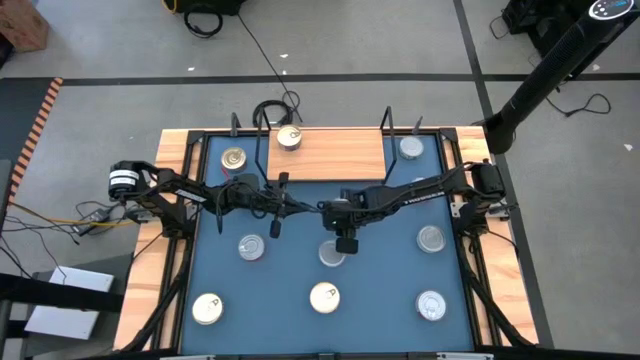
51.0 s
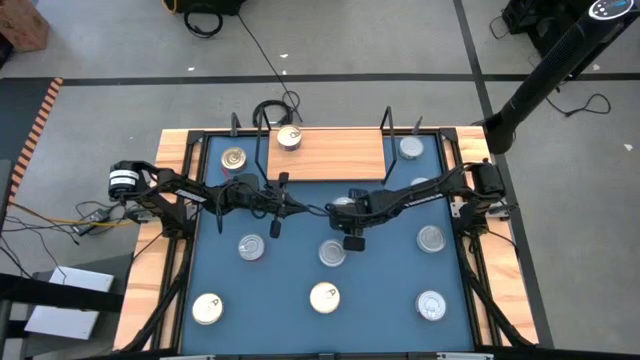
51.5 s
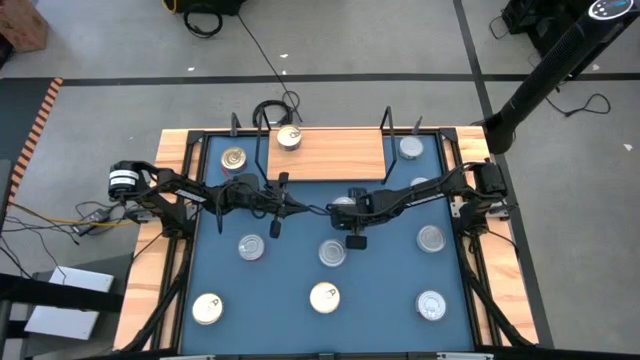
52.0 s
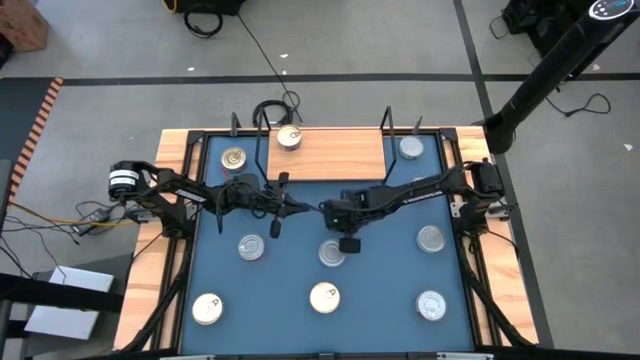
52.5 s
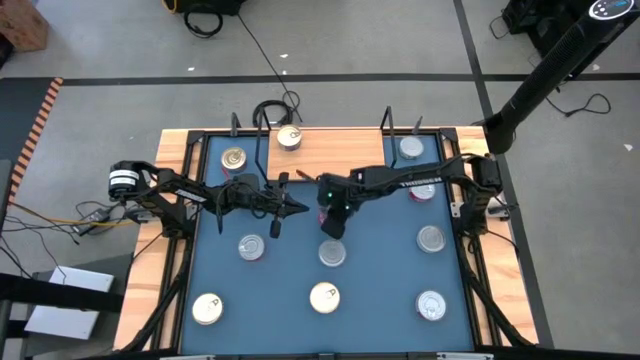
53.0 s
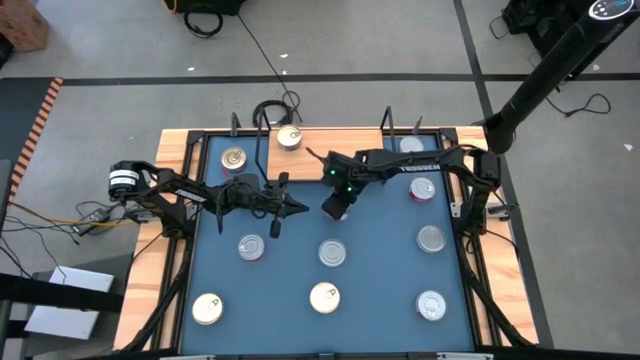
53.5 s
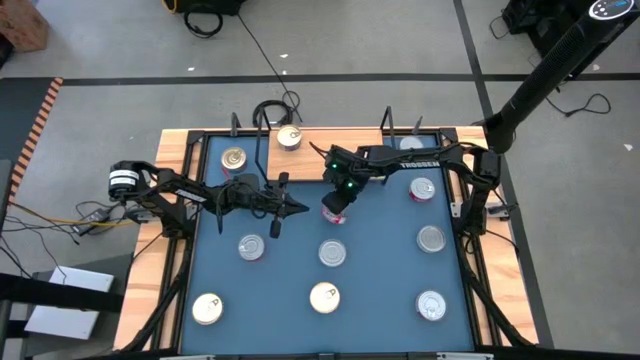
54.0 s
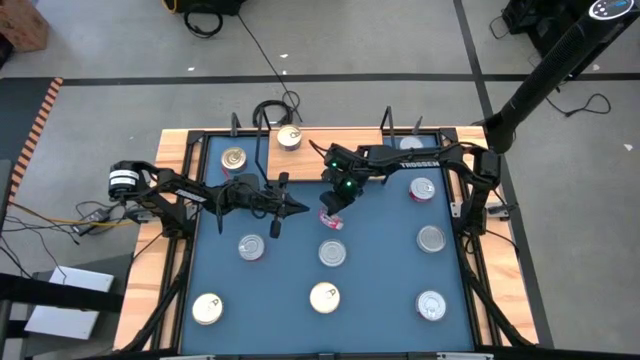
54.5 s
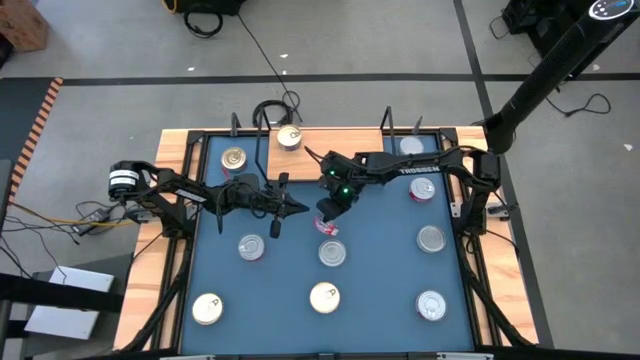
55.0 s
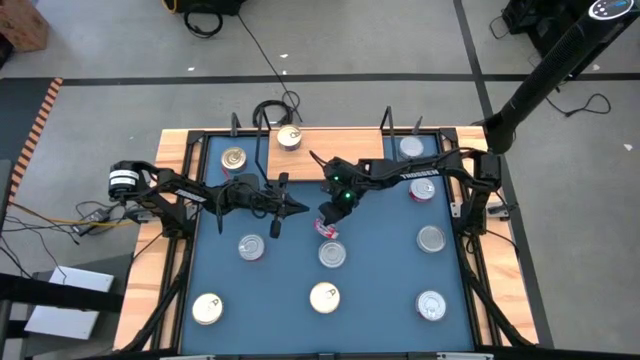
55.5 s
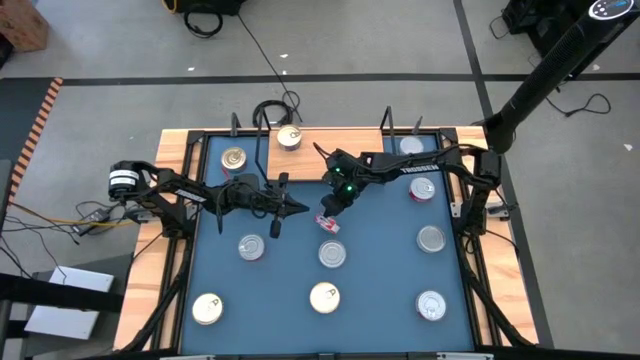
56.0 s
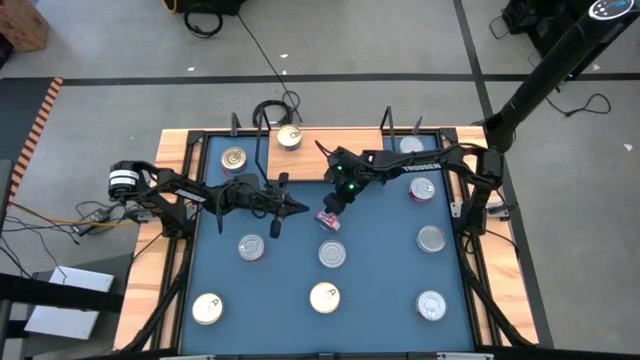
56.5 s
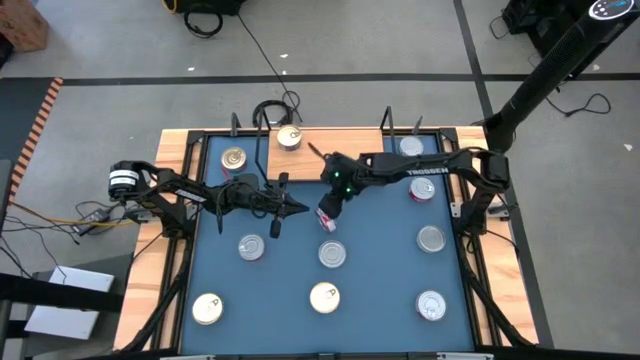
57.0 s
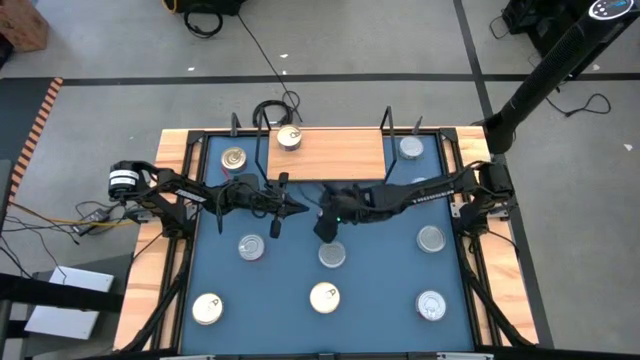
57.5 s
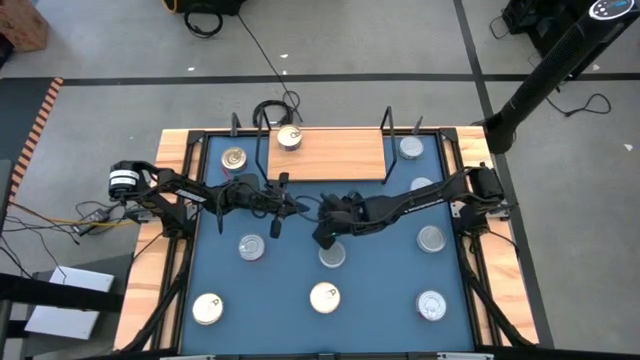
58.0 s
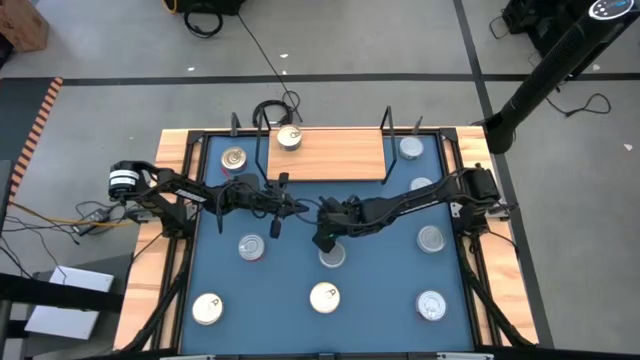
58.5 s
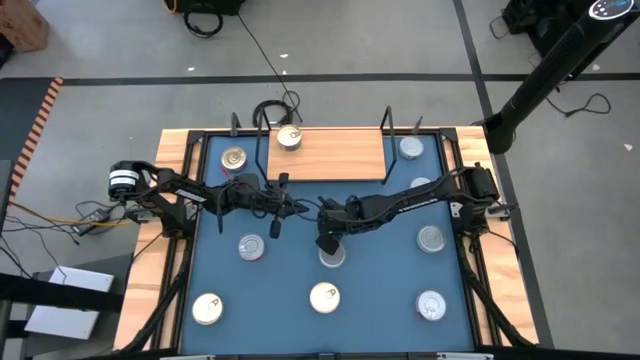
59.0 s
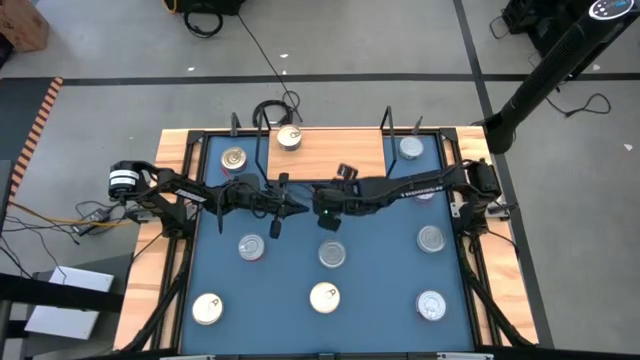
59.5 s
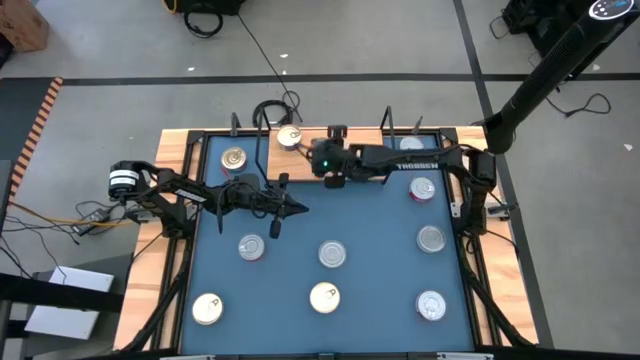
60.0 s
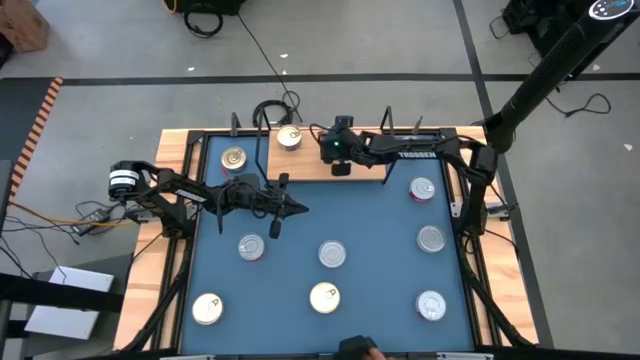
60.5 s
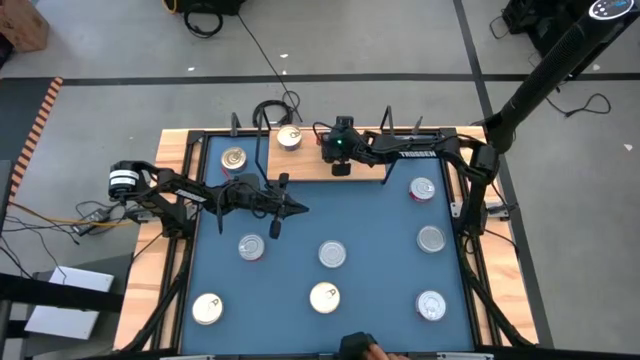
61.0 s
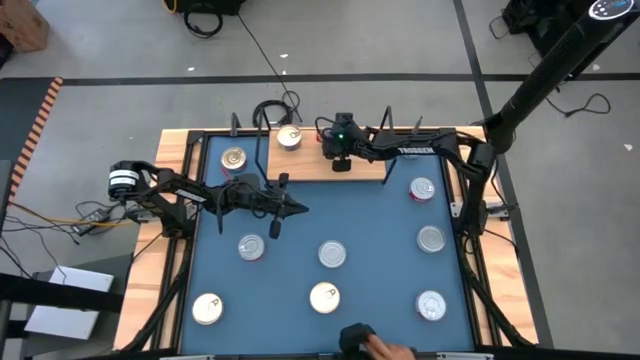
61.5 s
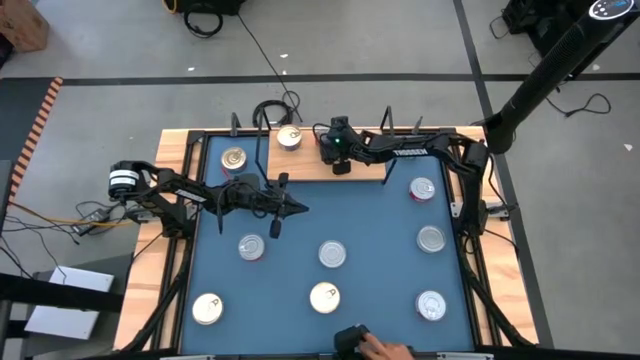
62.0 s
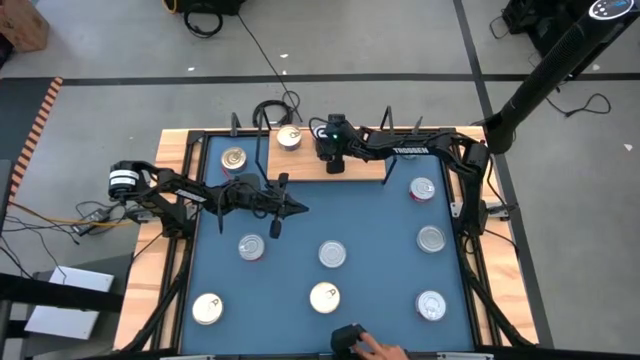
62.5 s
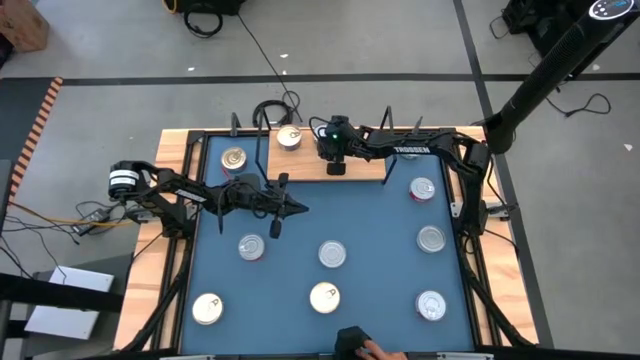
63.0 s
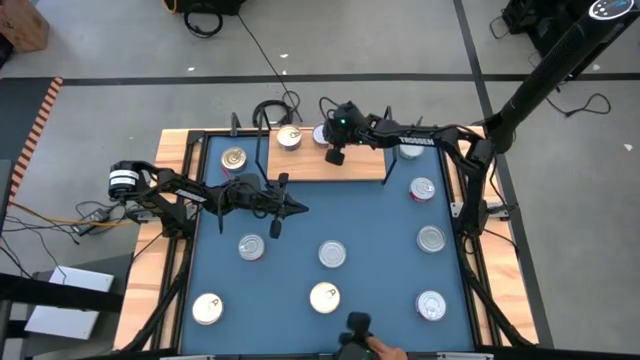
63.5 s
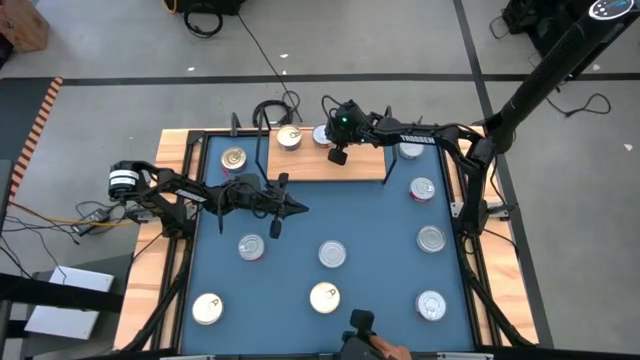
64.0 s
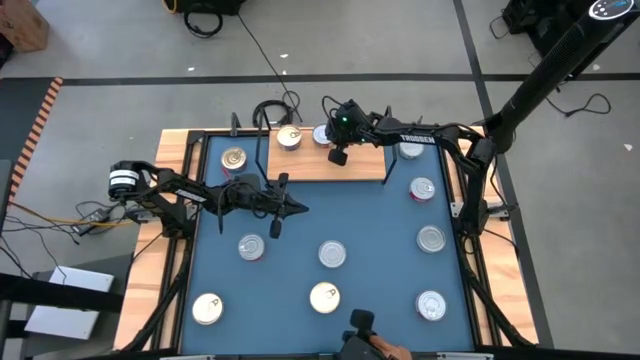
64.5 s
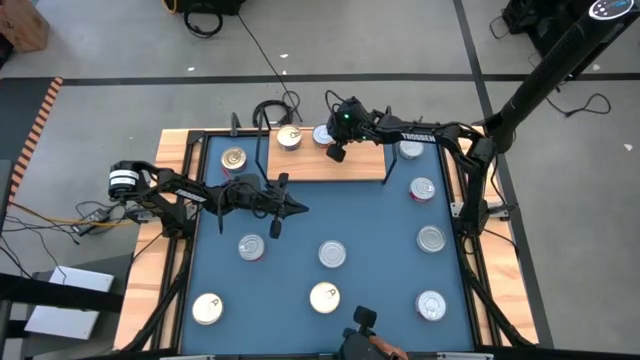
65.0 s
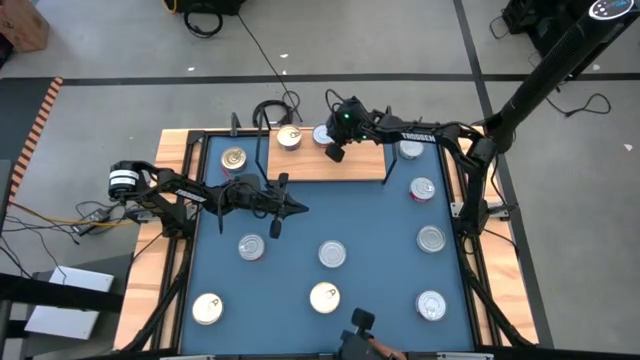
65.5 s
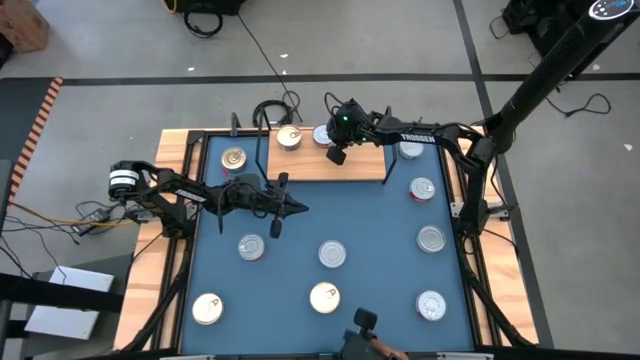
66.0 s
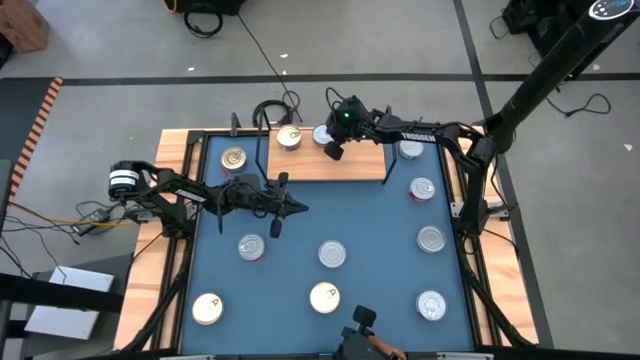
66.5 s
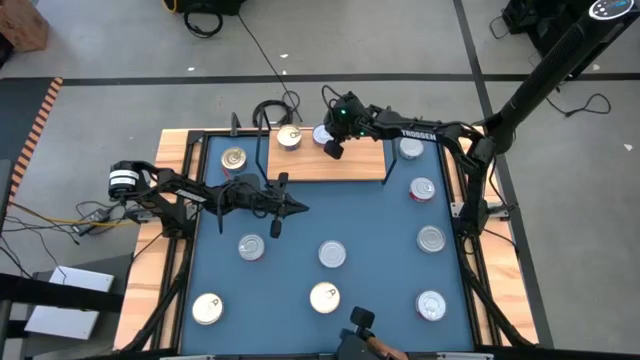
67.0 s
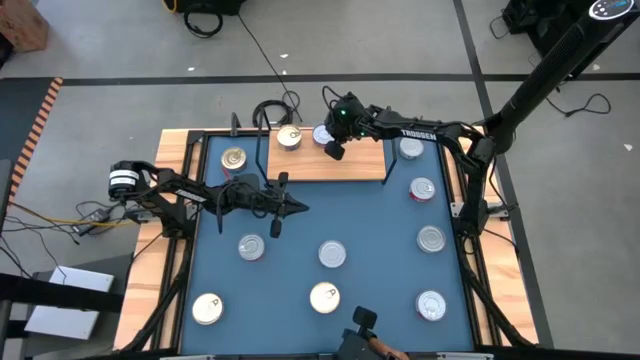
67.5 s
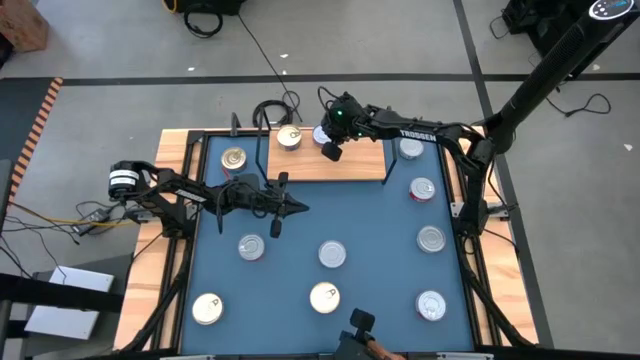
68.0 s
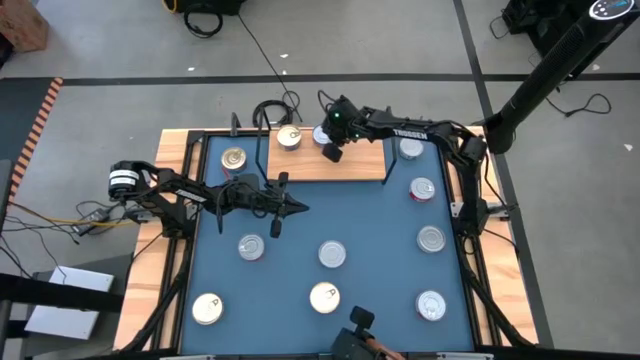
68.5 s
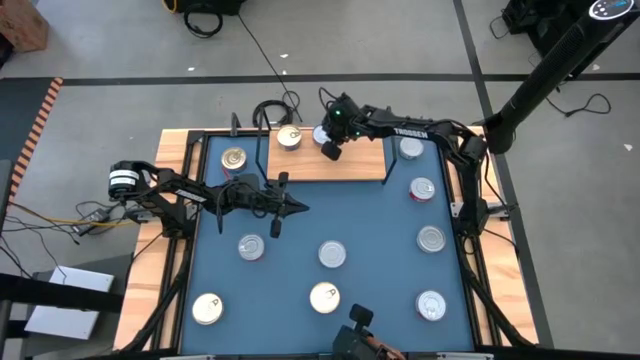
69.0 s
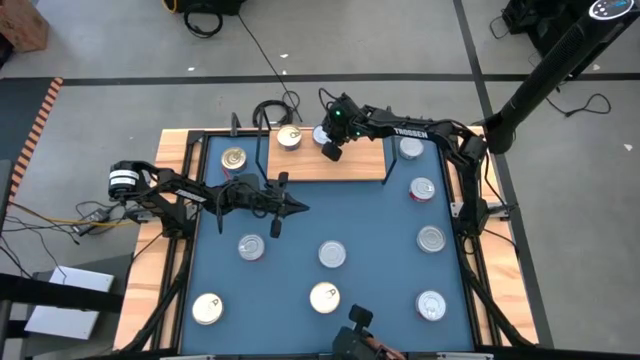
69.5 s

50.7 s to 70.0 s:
Task: Stack canned seafood by type on shelf
Put the top left red tuna can on the shelf

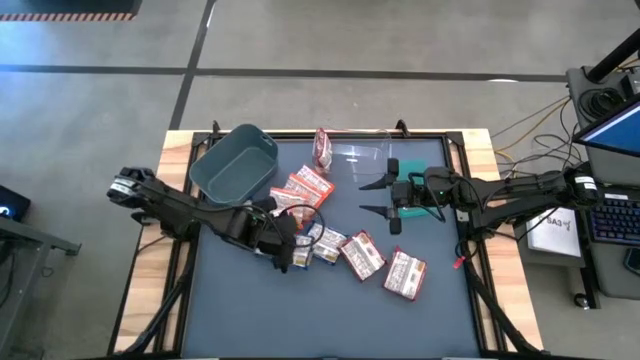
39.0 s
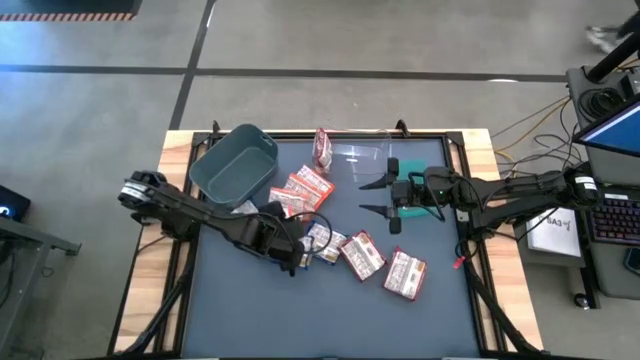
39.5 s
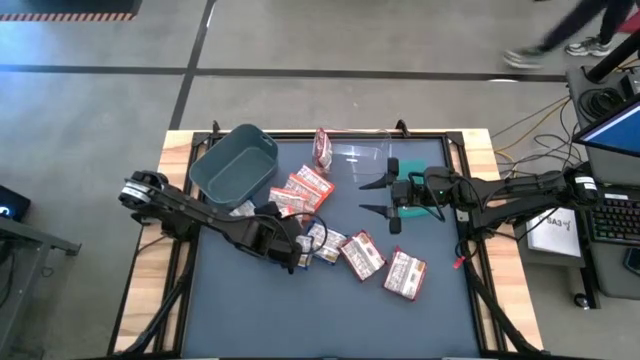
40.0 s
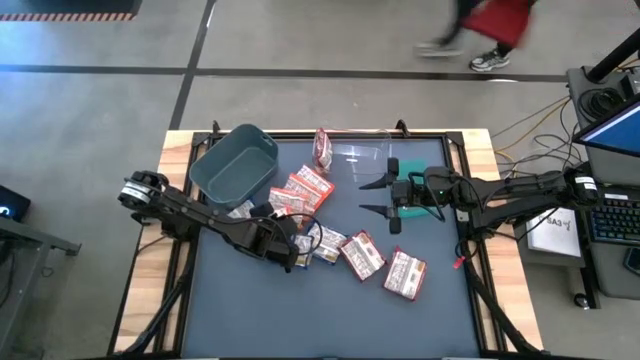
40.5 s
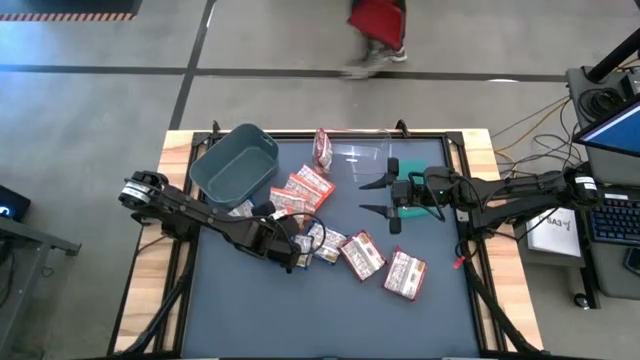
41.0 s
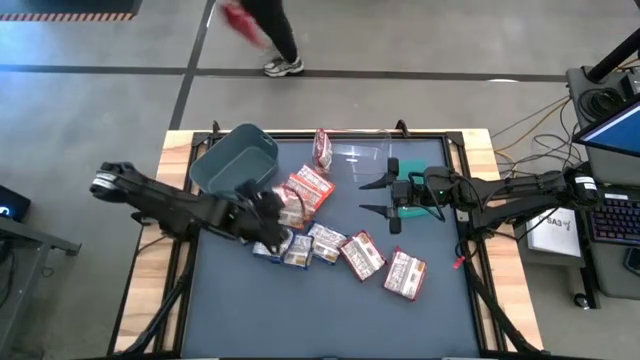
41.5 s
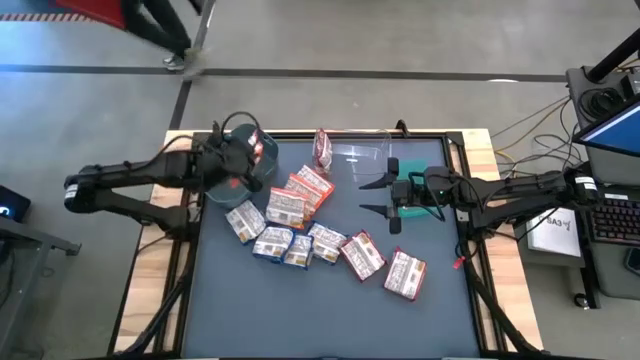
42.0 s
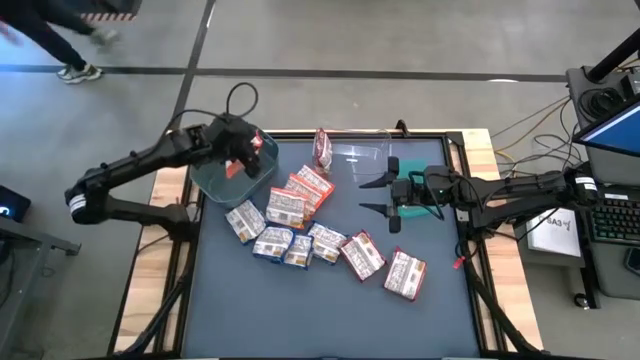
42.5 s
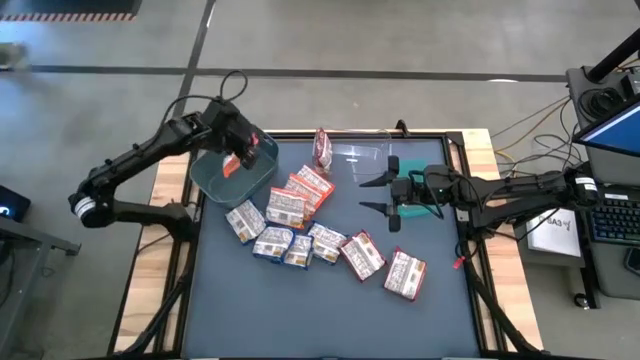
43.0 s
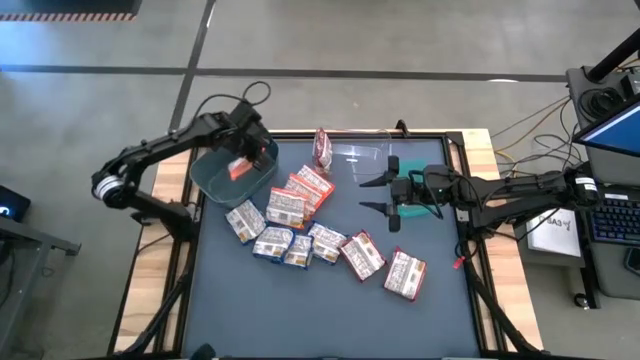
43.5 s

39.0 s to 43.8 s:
Task: Sort Maruchan noodles
Put the orange noodle pack into the gray bin
